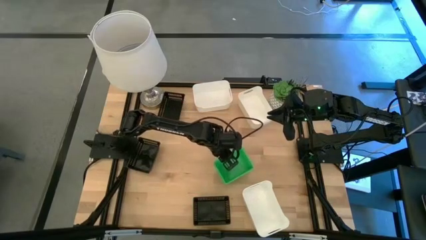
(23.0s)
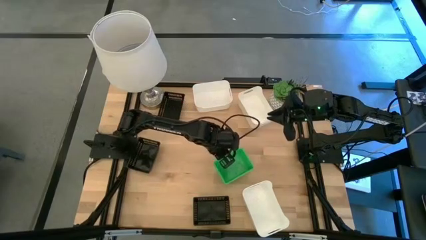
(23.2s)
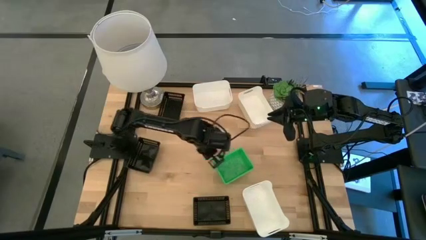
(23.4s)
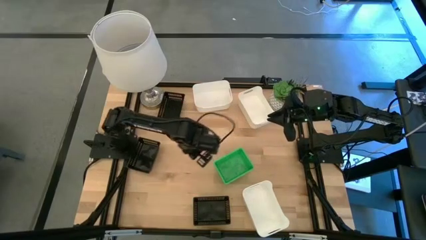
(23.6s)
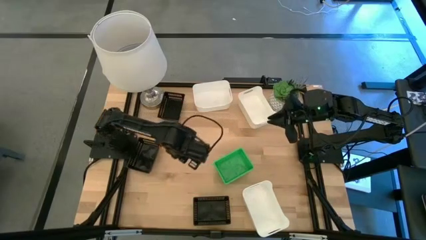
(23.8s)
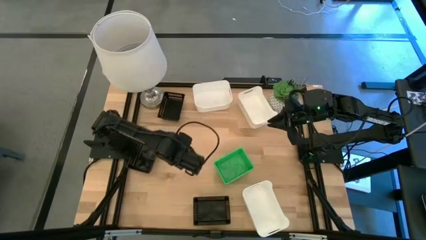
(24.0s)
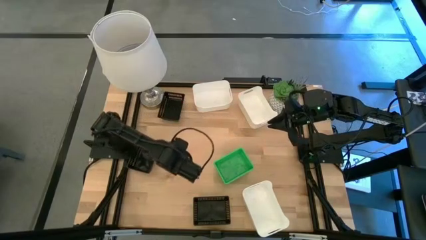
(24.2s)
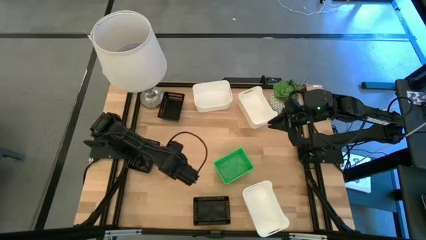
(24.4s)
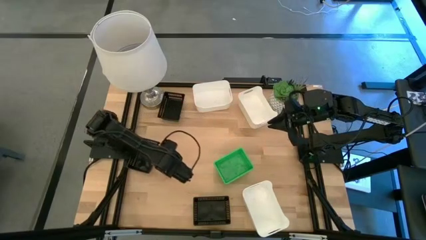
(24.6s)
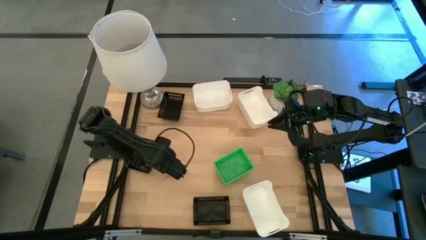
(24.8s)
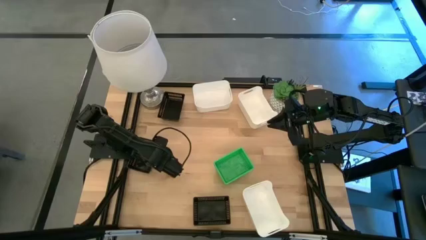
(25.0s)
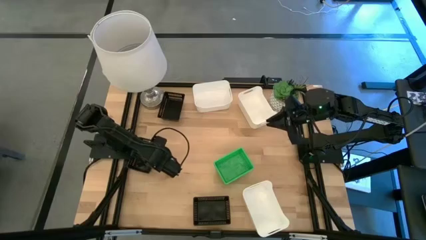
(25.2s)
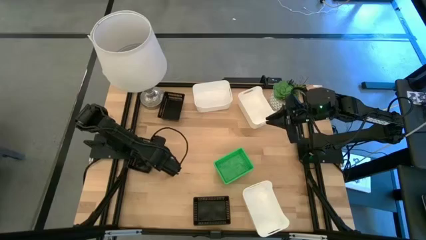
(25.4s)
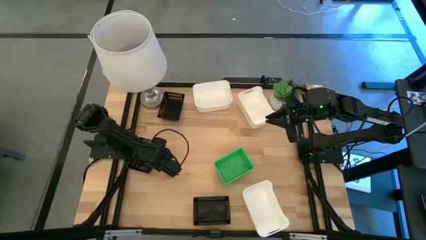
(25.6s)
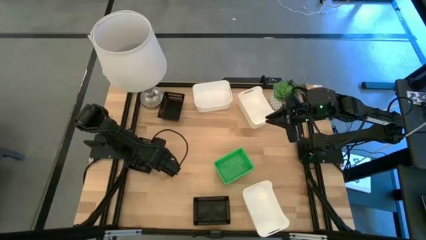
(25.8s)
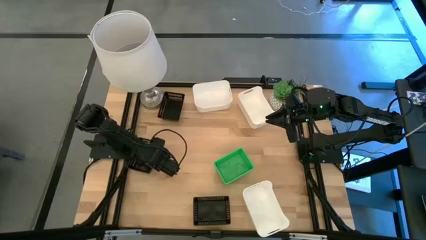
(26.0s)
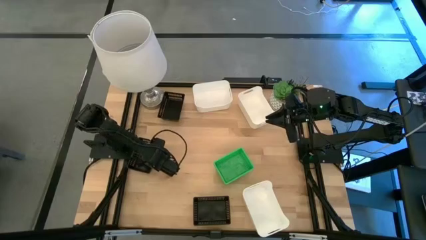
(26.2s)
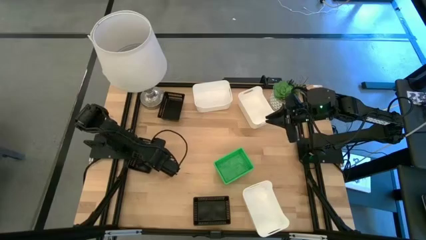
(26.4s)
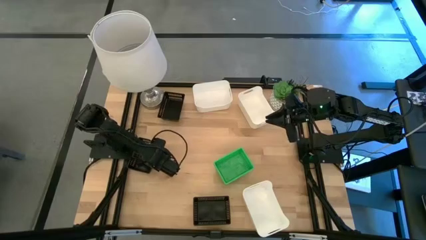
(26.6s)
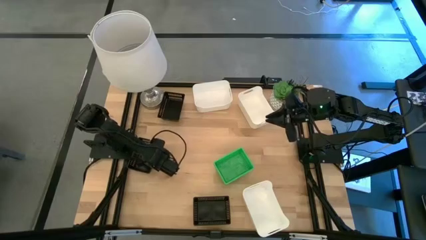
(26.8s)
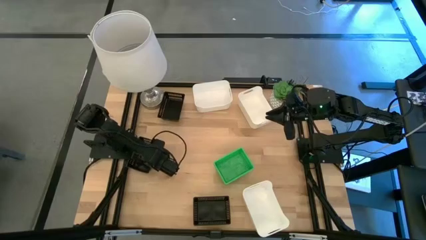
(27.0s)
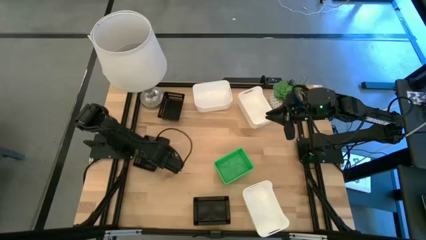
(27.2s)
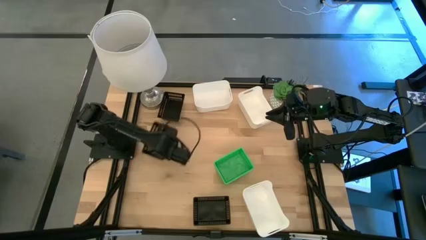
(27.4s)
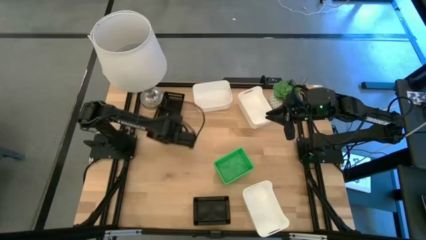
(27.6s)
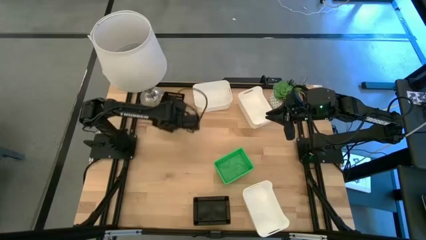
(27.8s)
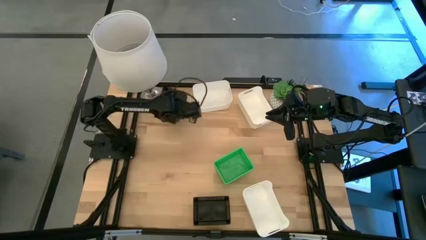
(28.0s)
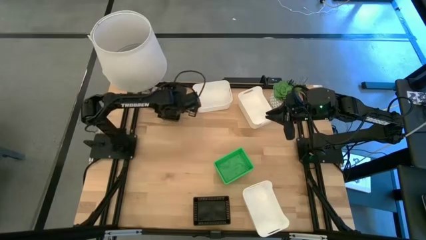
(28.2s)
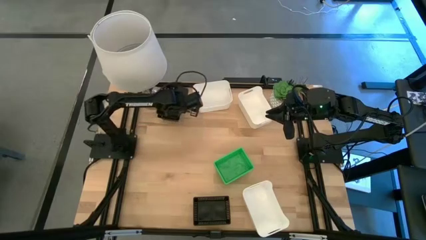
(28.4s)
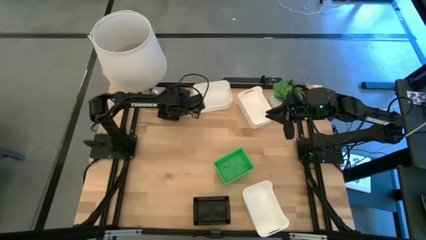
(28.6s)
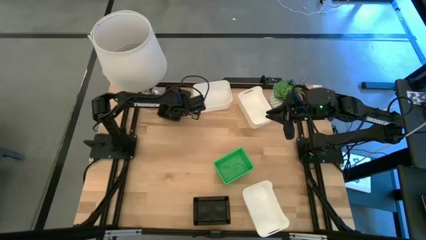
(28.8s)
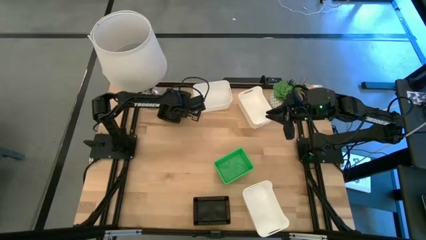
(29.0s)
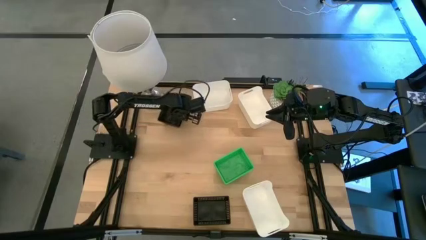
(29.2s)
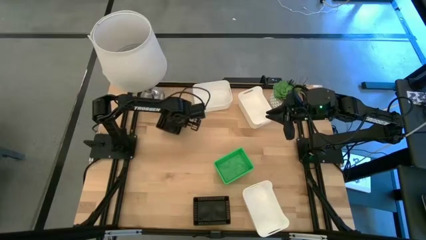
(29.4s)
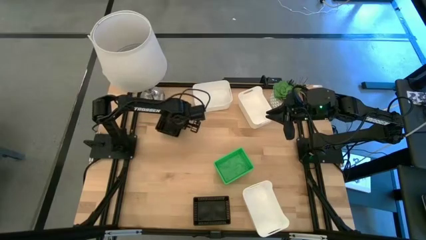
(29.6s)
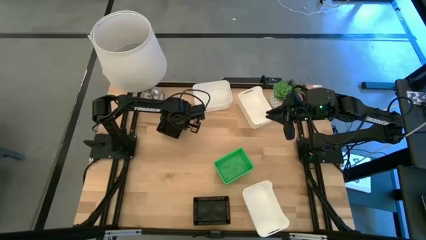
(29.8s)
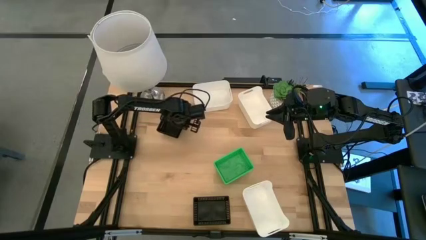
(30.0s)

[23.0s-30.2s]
Stack the middle black bin on the top black bin

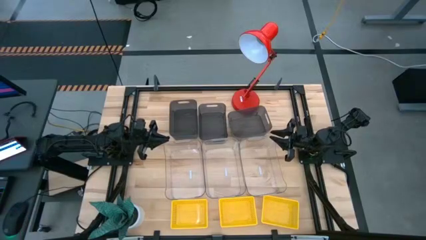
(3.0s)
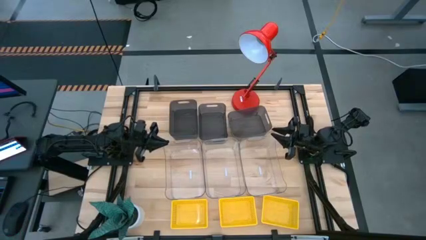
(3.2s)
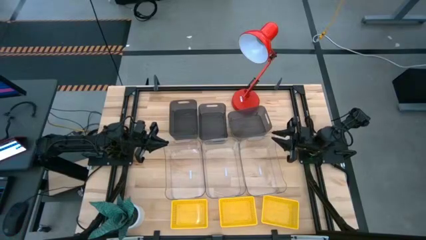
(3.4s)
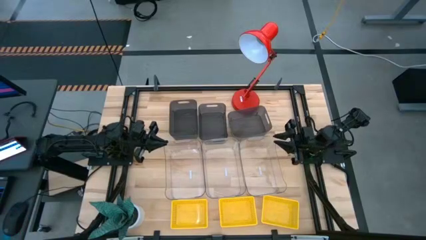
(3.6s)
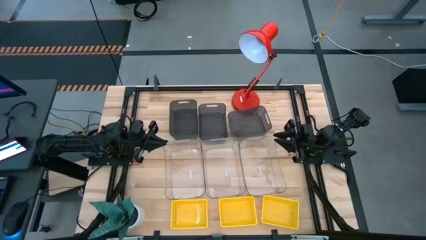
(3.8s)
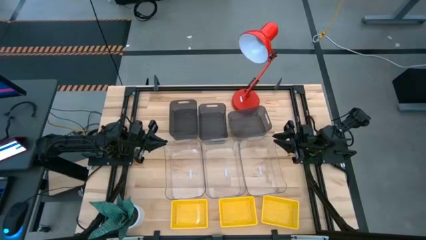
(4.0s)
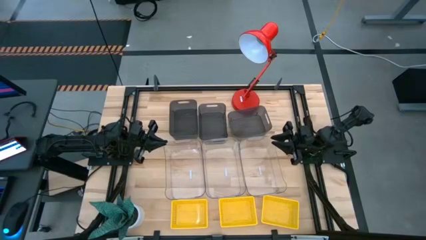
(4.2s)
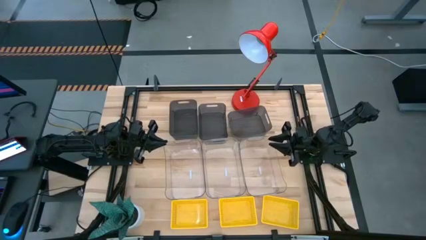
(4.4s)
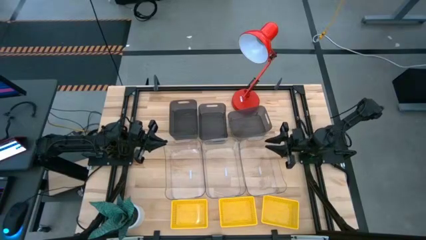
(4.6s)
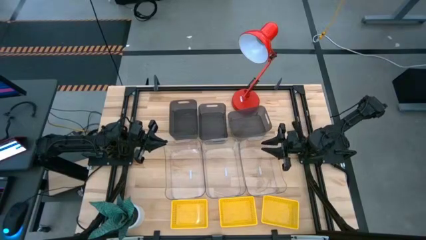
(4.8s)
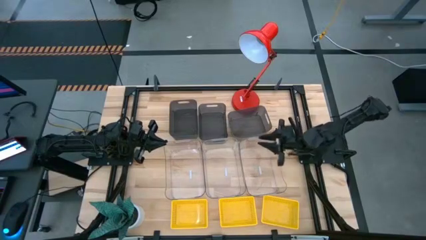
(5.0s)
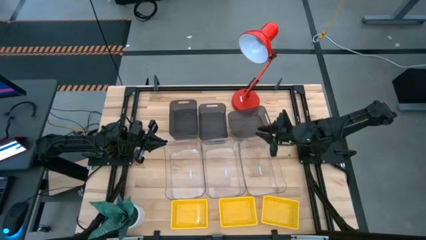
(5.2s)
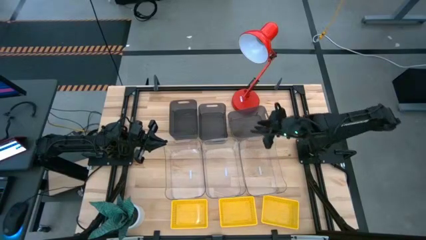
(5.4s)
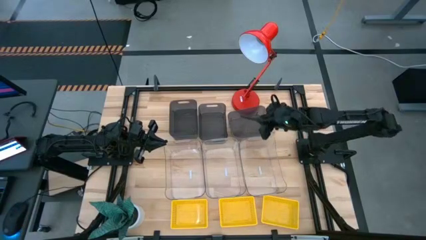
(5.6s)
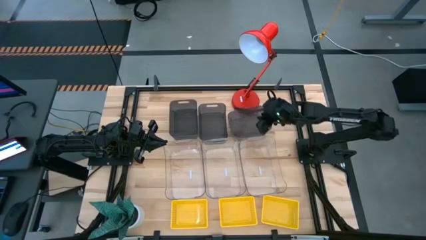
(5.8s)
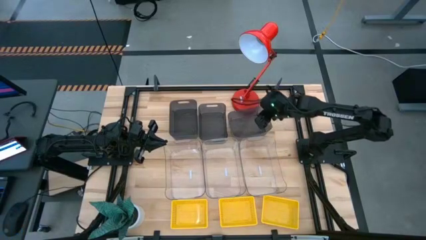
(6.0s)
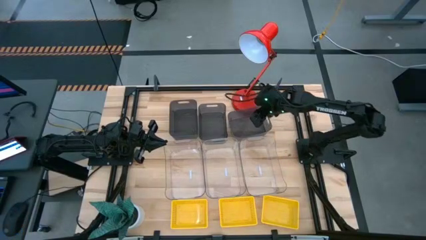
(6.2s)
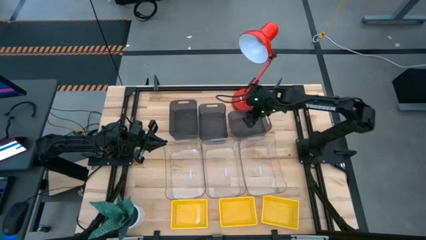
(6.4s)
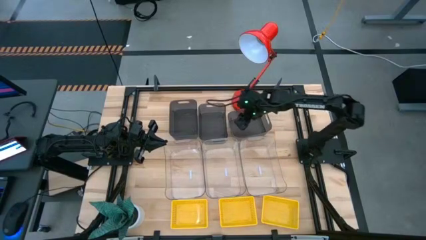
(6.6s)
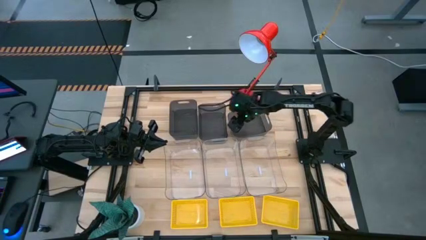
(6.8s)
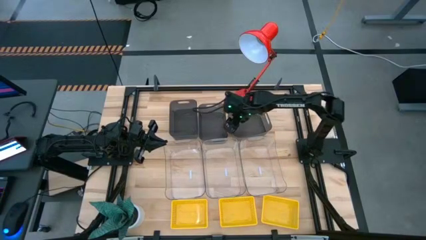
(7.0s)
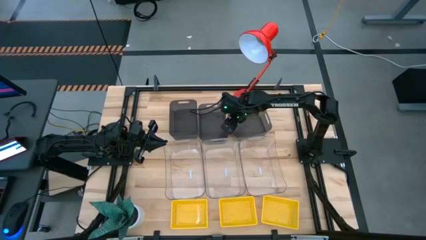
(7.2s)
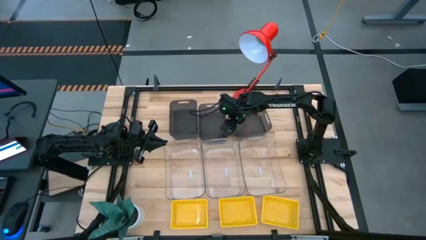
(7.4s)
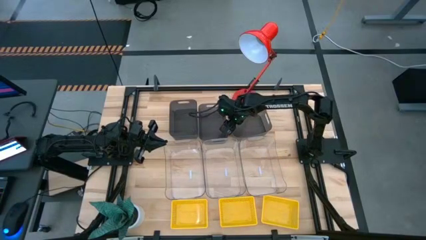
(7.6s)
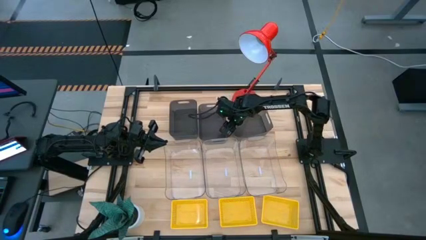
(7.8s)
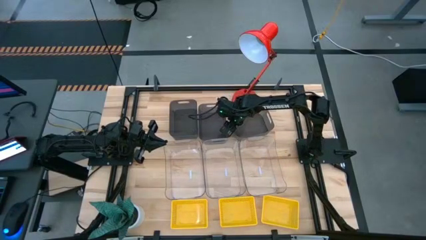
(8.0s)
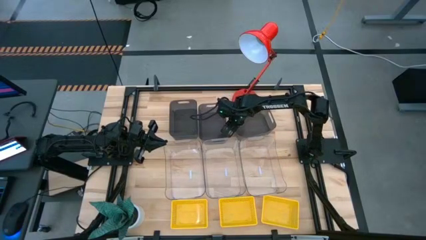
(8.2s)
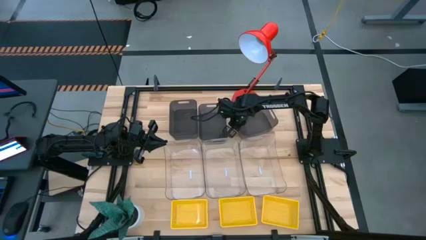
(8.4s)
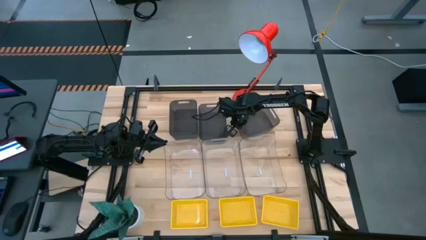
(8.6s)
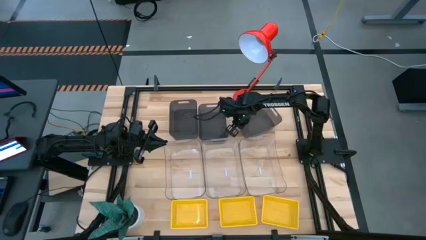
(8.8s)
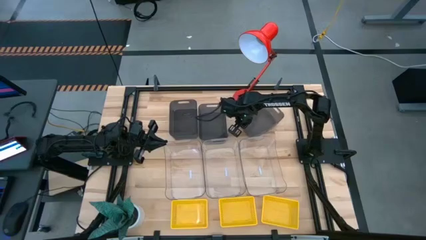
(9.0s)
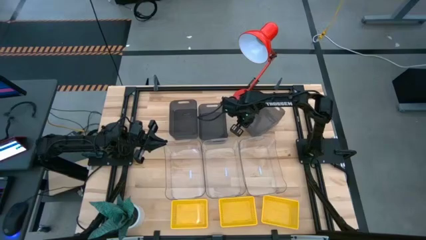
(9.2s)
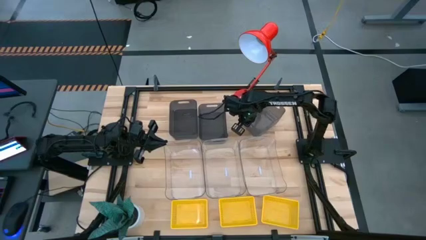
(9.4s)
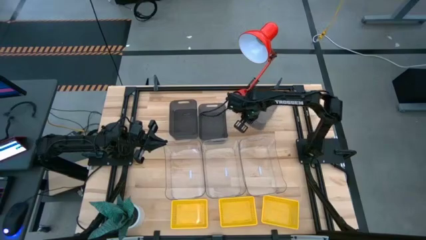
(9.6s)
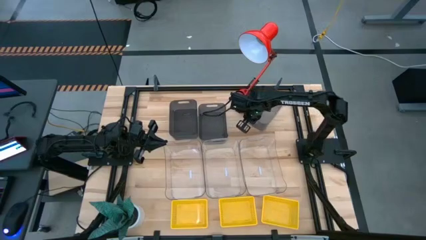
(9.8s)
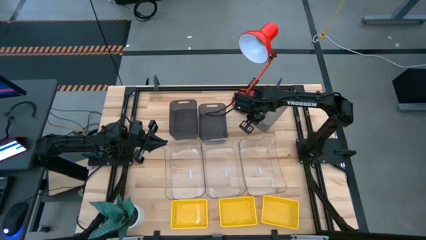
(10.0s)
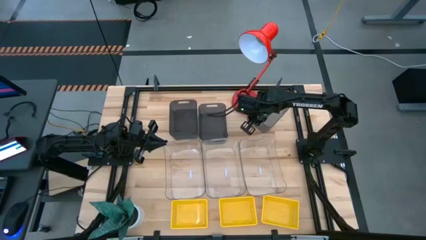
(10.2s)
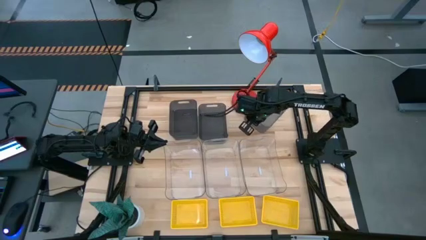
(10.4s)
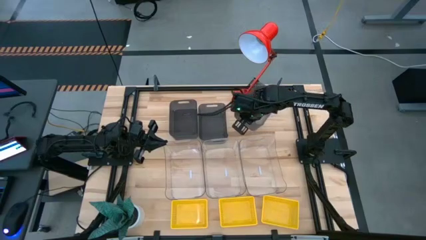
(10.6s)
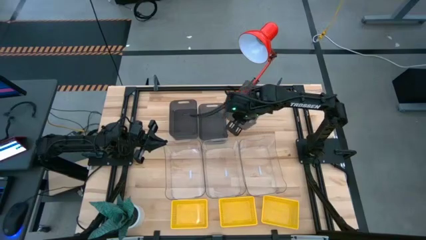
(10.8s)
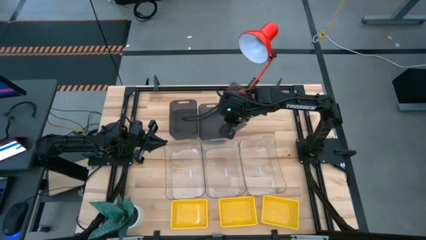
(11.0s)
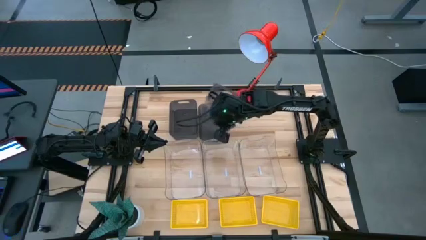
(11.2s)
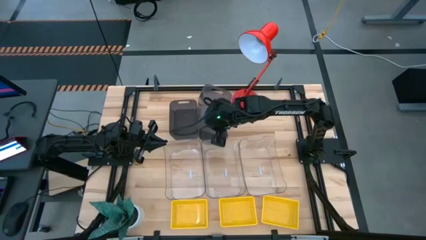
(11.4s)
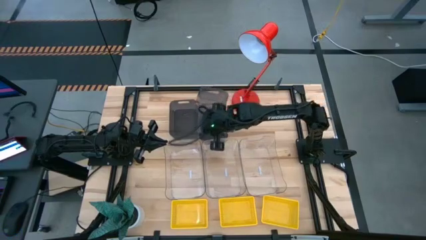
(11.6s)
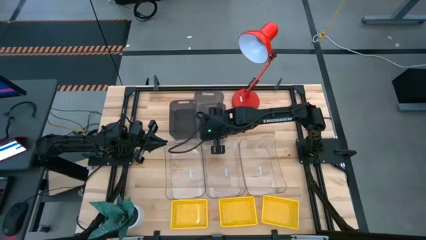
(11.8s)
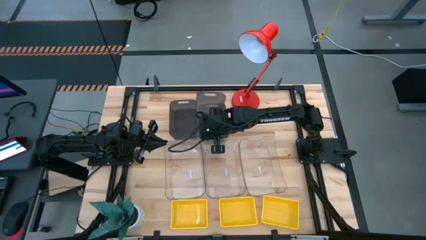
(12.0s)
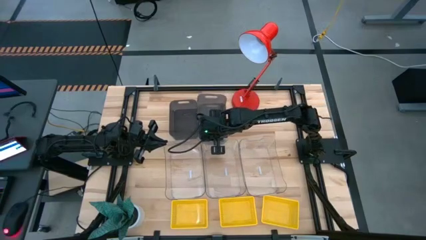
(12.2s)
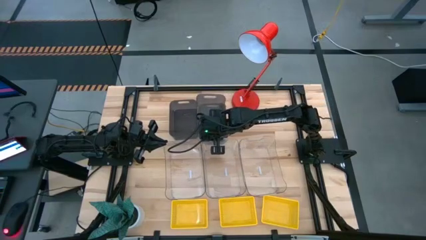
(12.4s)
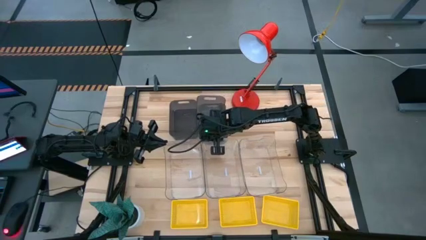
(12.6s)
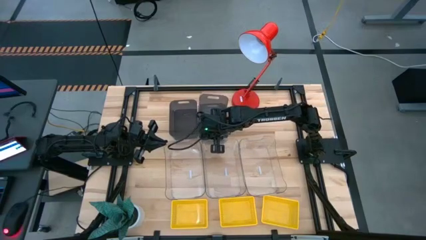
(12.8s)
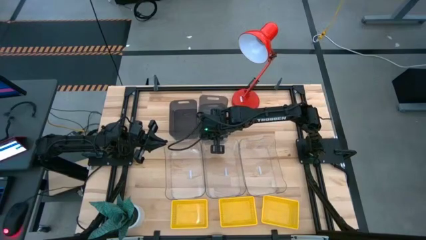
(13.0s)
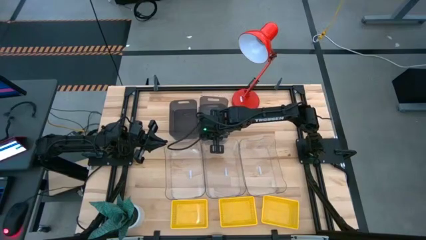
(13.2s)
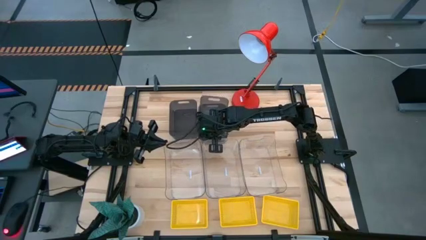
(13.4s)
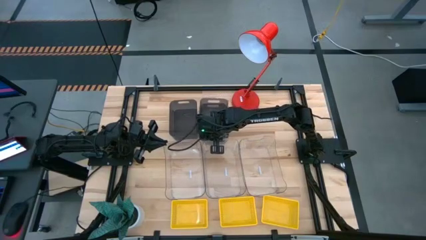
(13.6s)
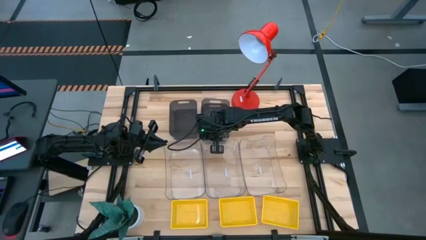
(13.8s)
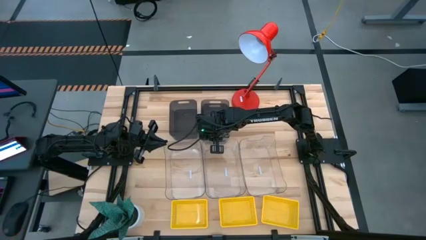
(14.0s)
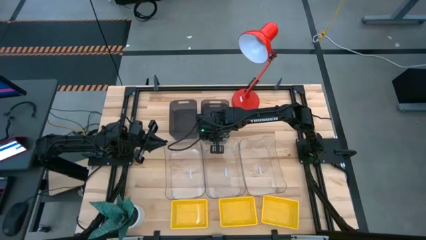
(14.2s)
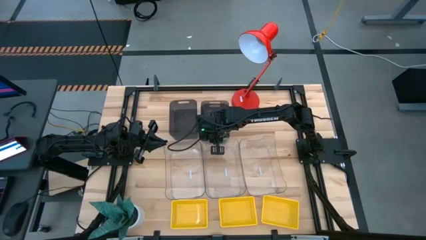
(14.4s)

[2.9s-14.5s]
Stack the right black bin on top of the middle black bin
